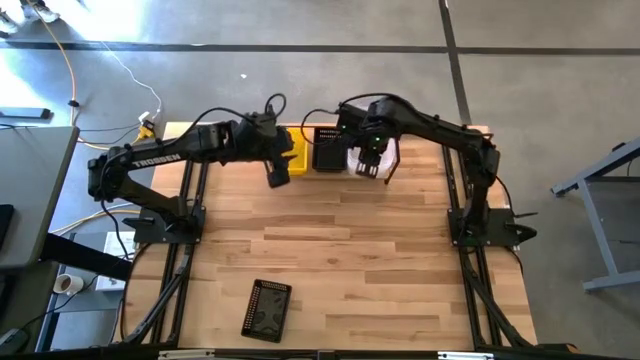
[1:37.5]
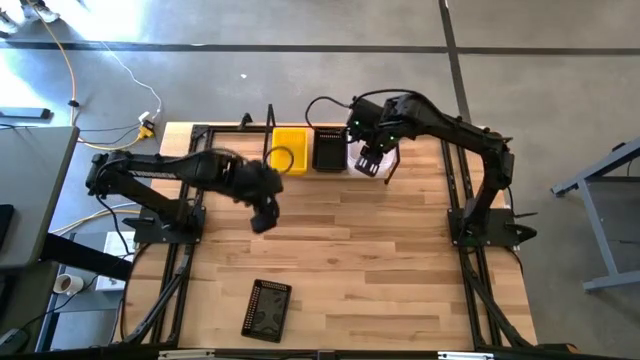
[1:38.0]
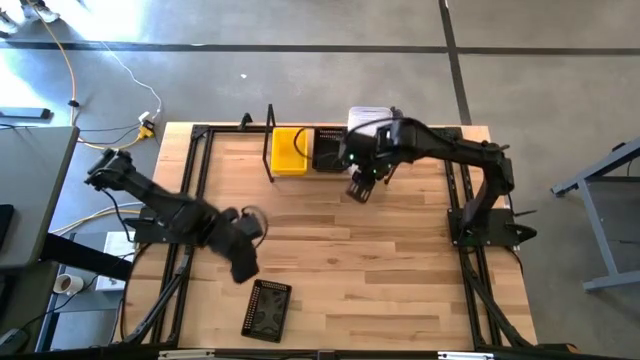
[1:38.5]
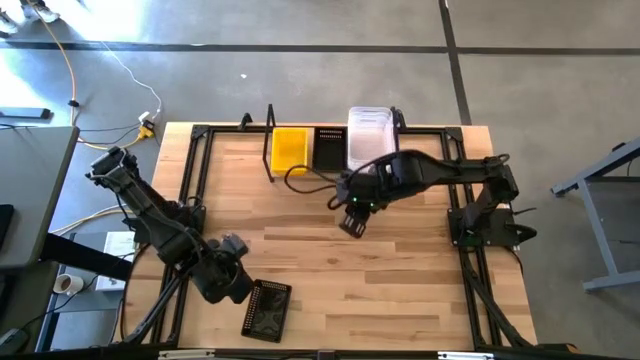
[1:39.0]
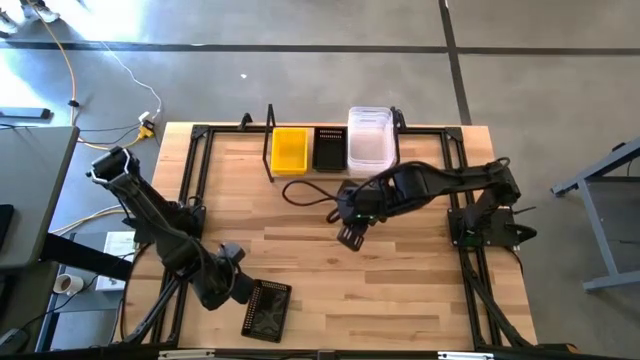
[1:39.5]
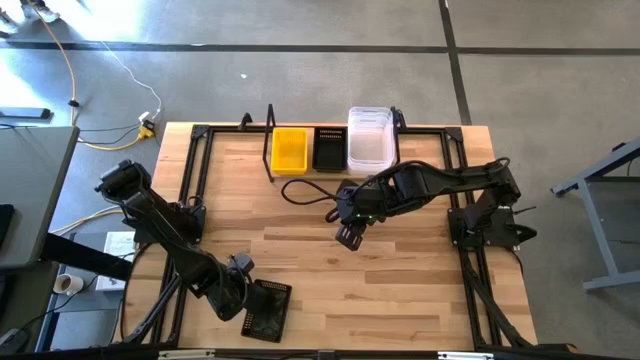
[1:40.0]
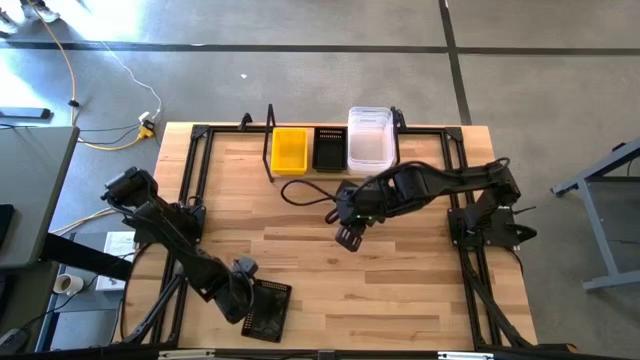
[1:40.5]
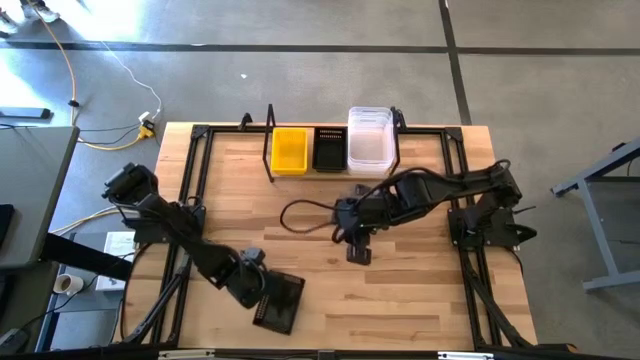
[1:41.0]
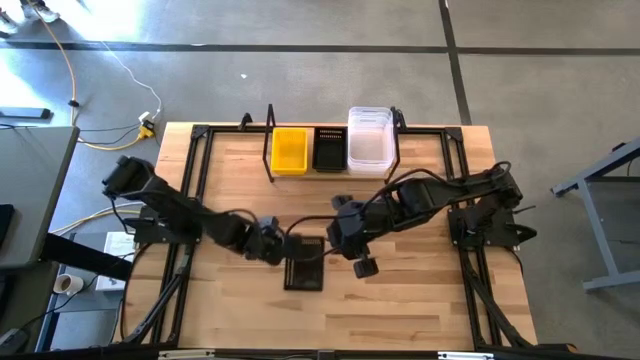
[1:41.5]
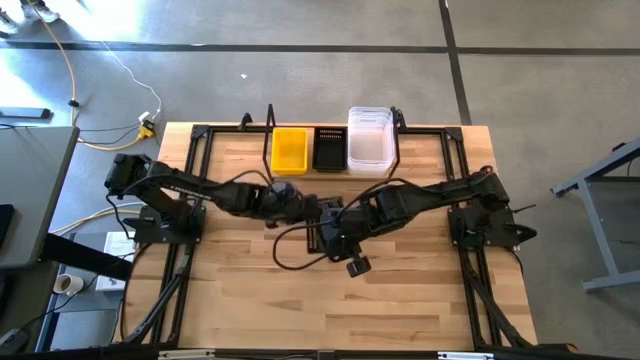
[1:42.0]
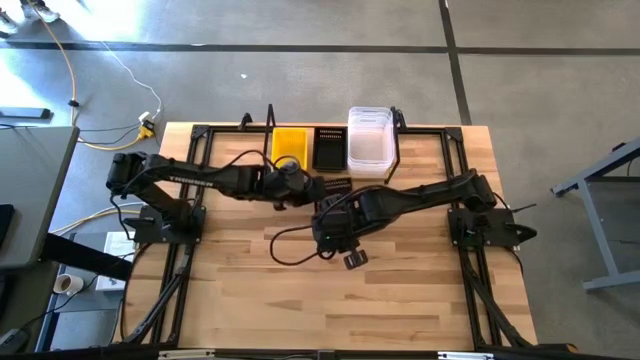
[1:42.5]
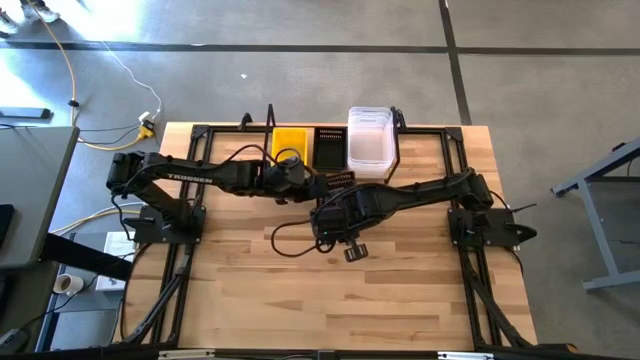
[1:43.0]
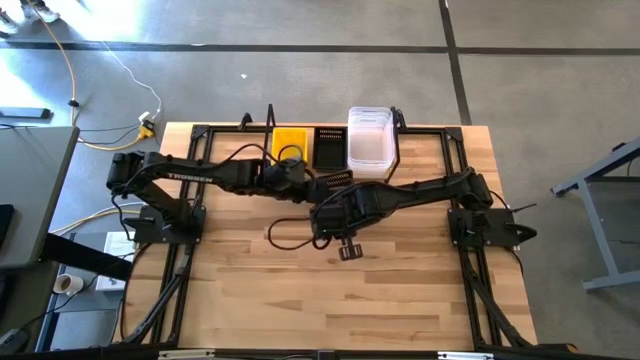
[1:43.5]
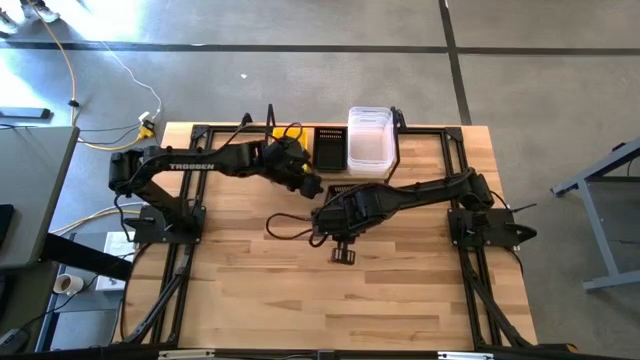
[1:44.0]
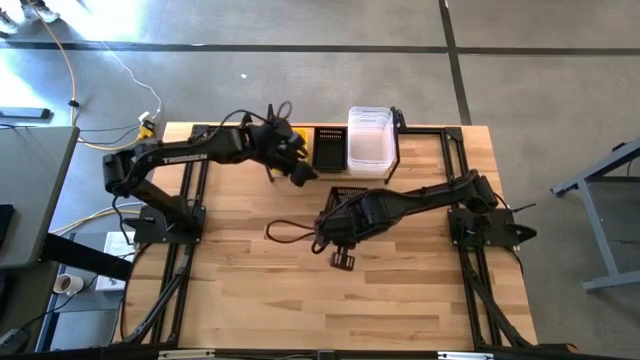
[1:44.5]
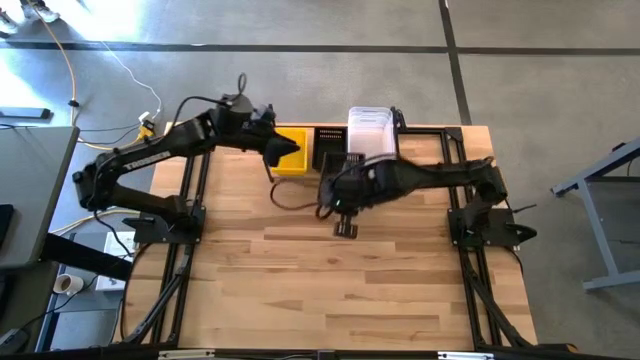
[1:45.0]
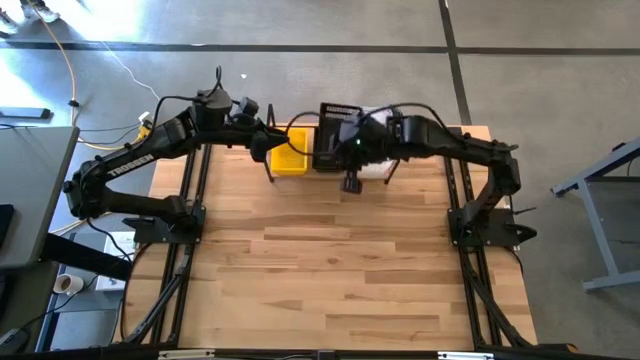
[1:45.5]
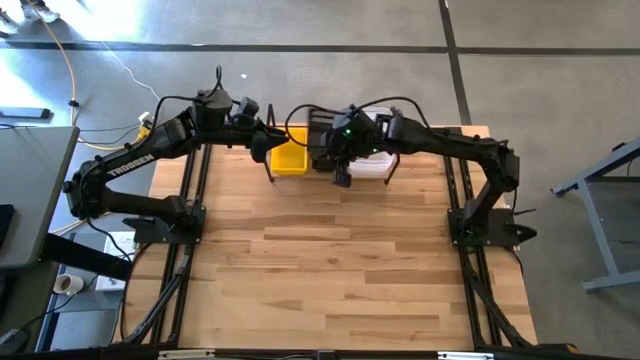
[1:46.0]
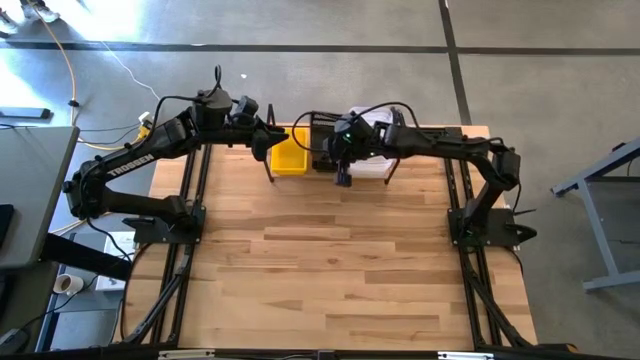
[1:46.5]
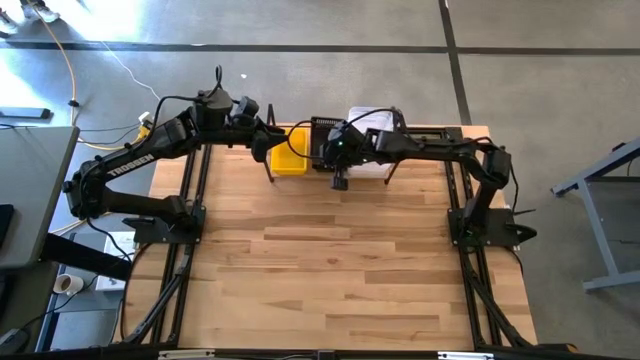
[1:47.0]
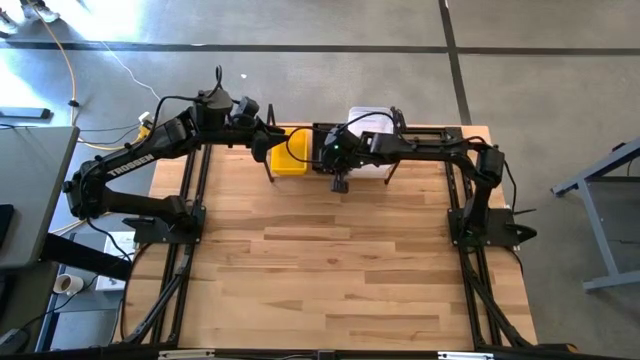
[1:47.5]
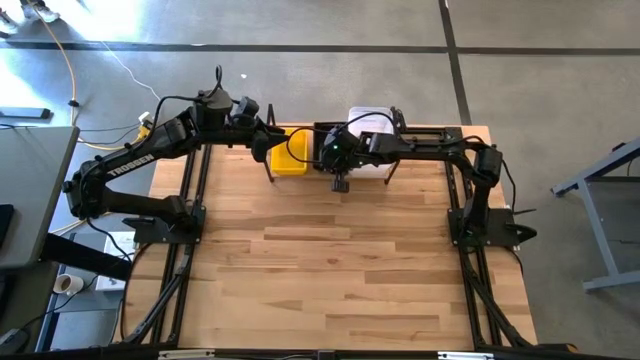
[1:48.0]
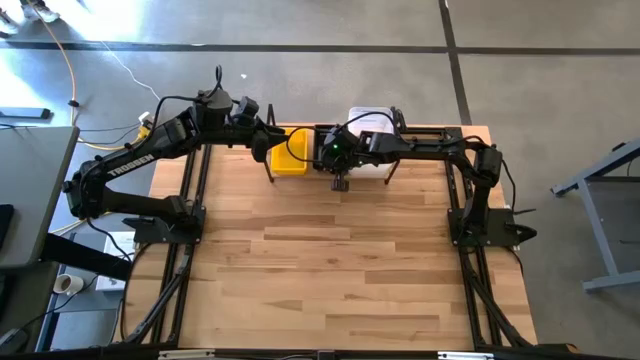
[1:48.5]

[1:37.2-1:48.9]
Task: Stack baskets on shelf by color
Stack the black bin on top of the black bin on the shelf

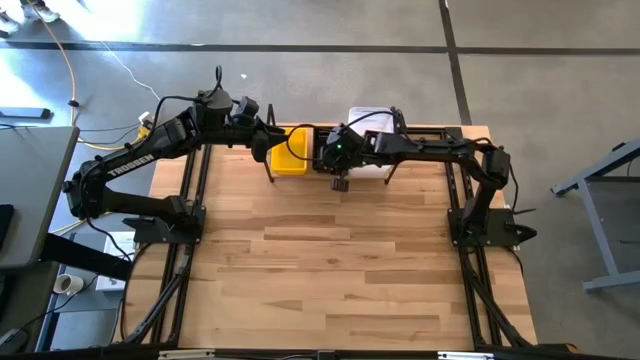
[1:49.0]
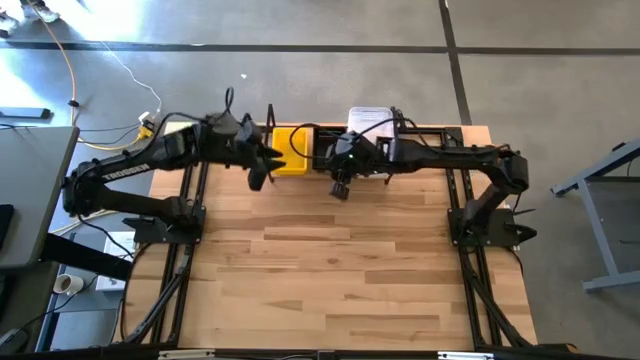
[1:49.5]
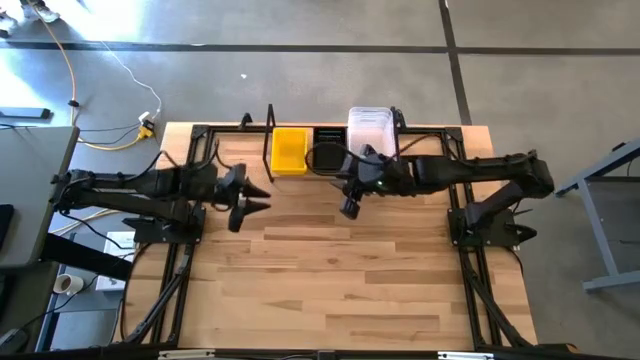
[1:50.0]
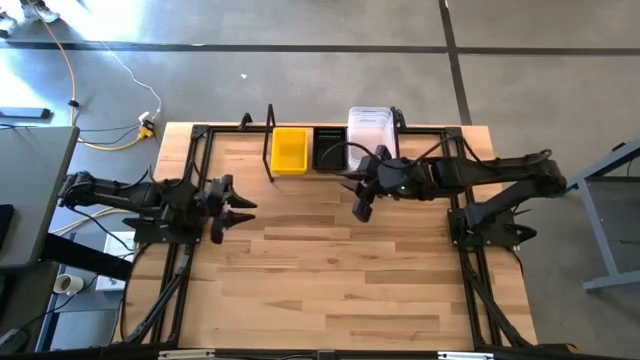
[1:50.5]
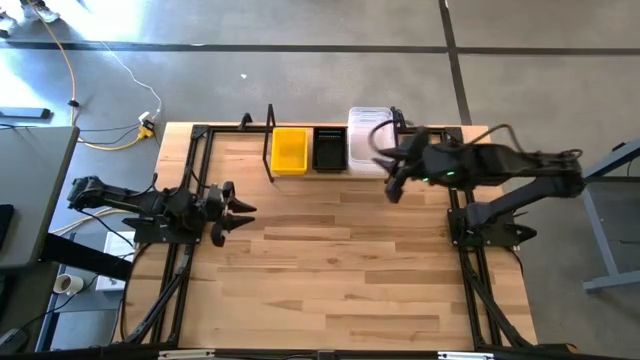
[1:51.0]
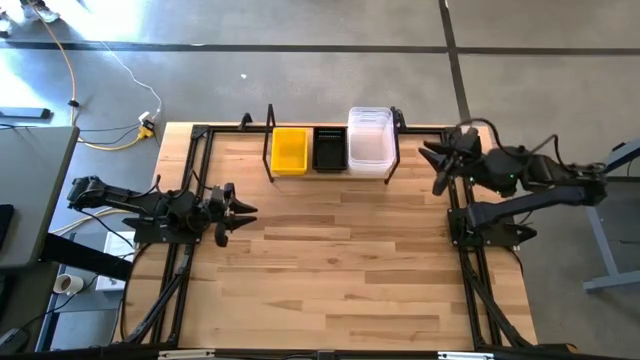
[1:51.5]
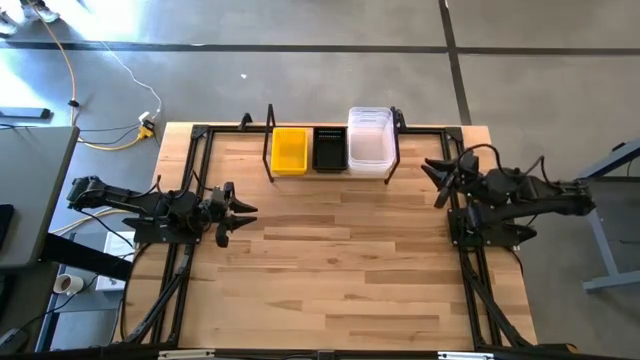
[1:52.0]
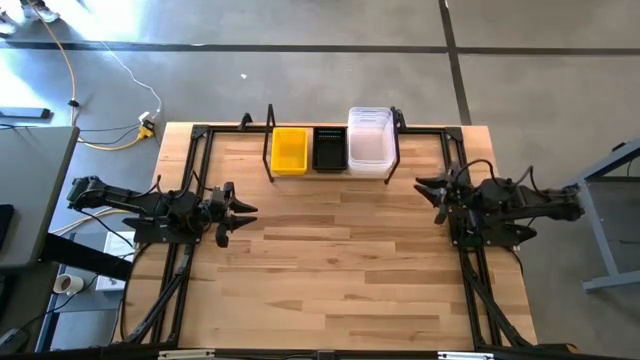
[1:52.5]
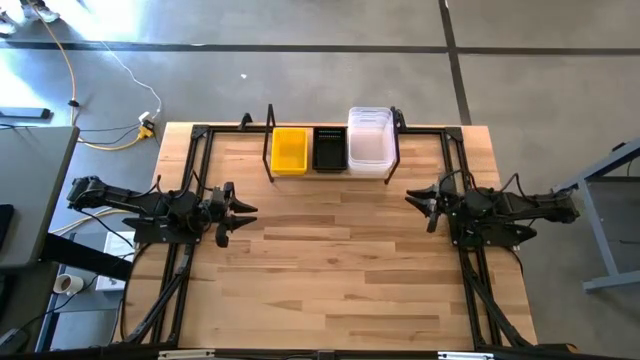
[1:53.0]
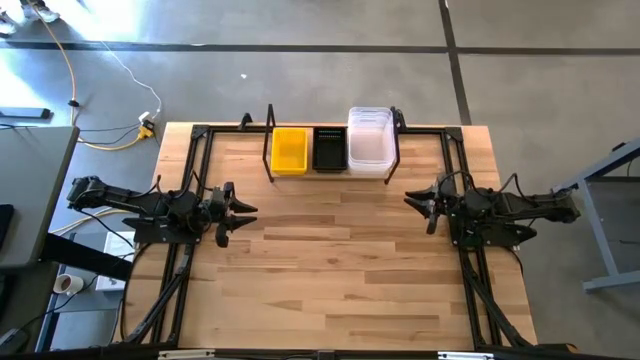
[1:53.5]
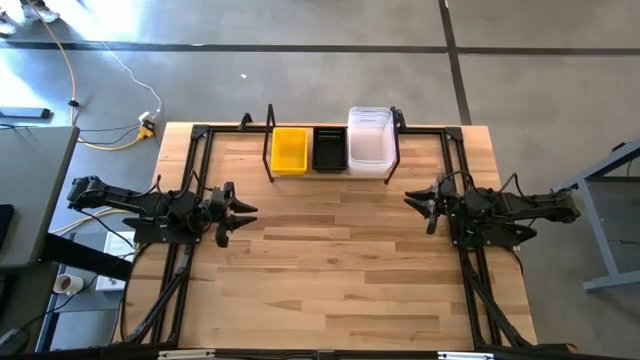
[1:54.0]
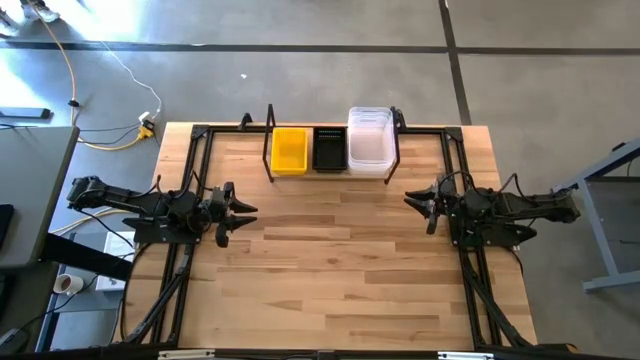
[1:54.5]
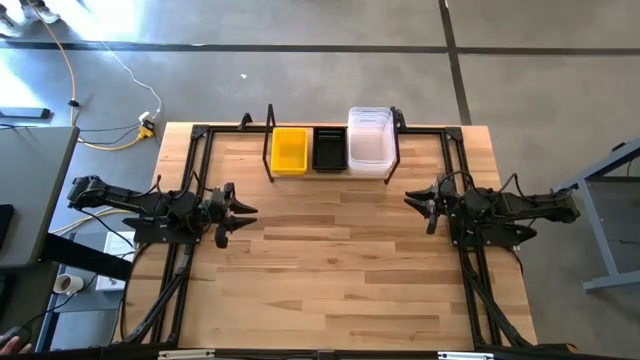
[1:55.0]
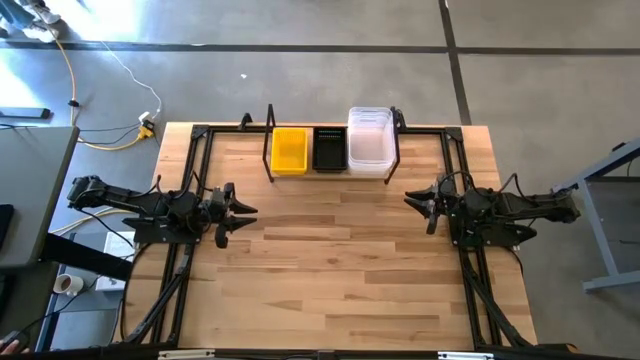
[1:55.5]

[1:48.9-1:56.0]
Return to Home Position

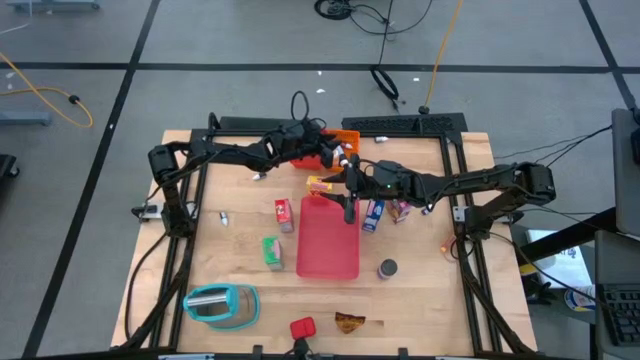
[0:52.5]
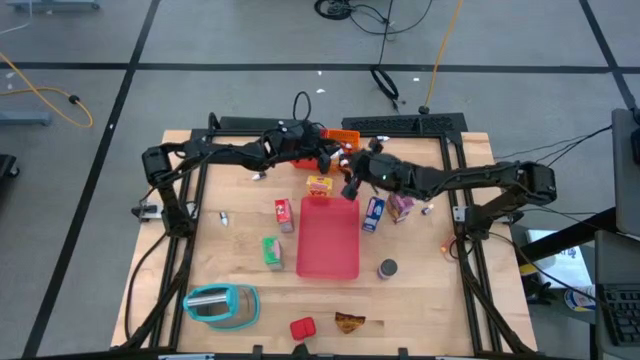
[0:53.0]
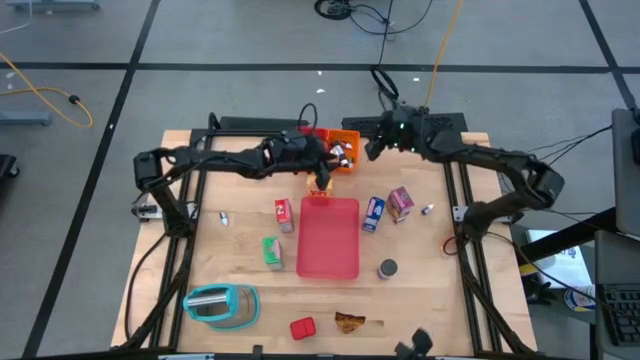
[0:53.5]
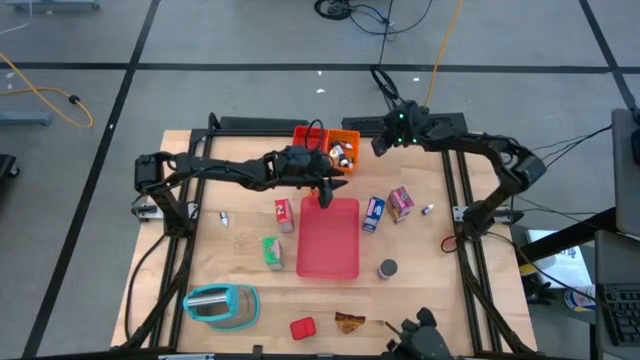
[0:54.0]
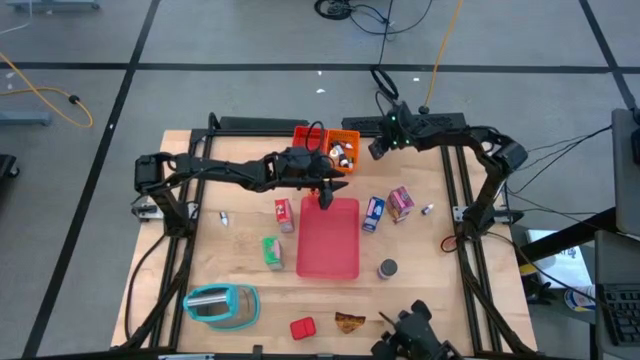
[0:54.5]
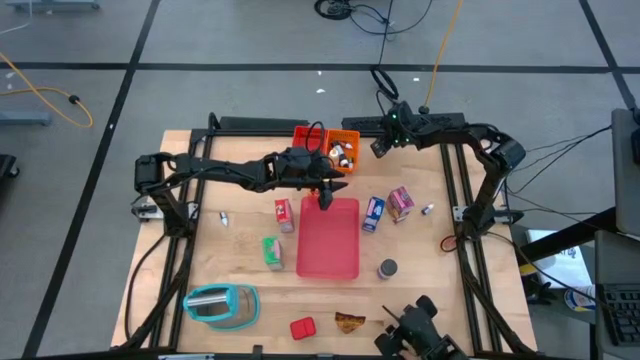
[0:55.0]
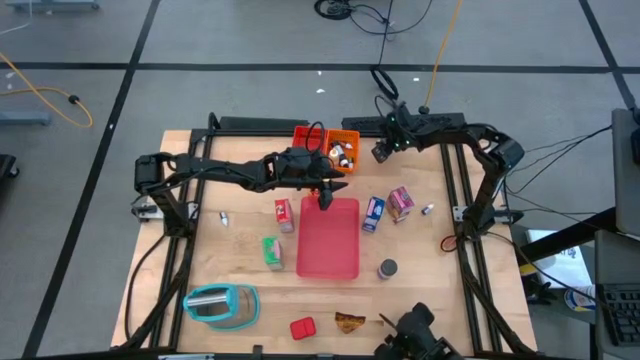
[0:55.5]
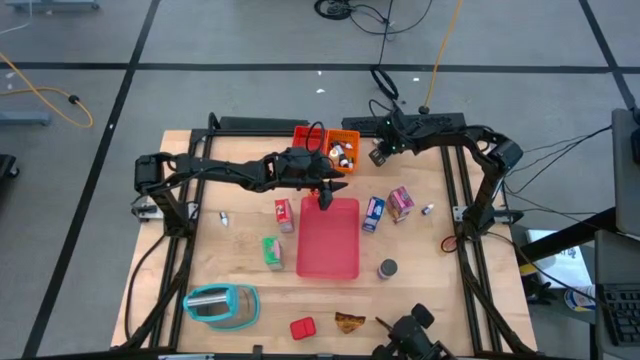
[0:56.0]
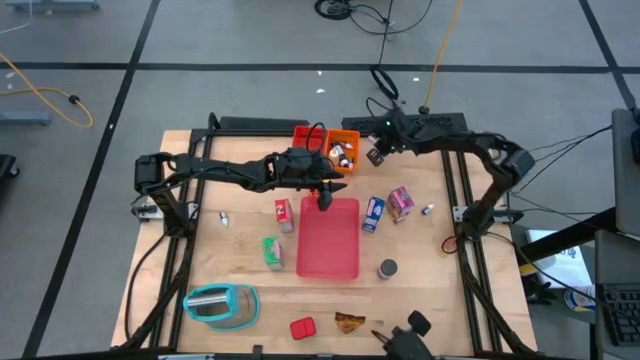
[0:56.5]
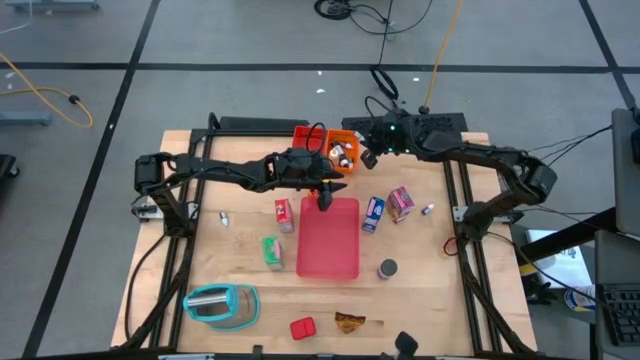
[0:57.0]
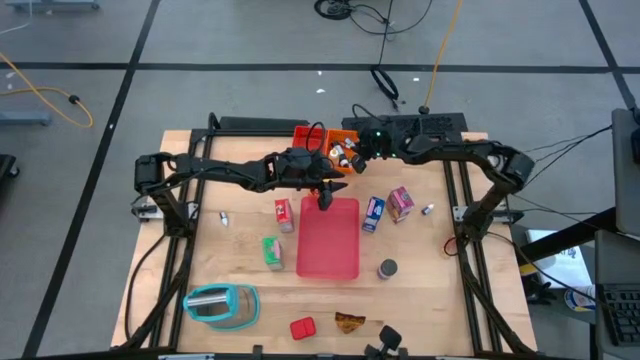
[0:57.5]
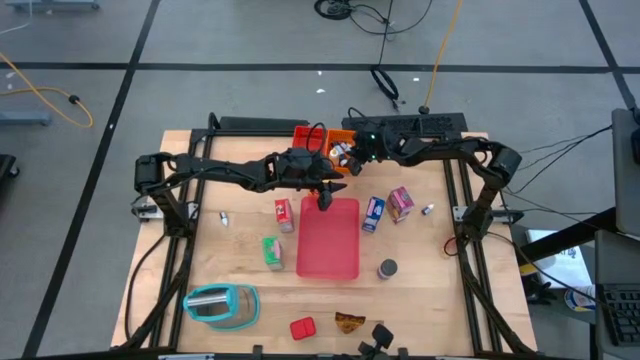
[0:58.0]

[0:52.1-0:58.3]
Task: Pick & Place Kitchen Items
Put the top right small black food coloring bottle into the orange basket
